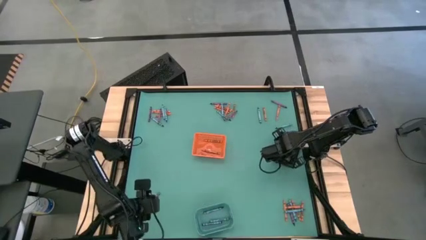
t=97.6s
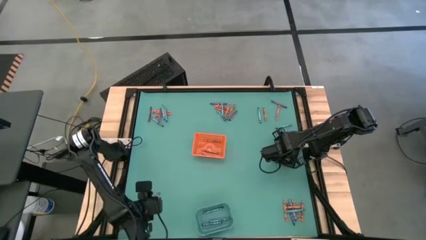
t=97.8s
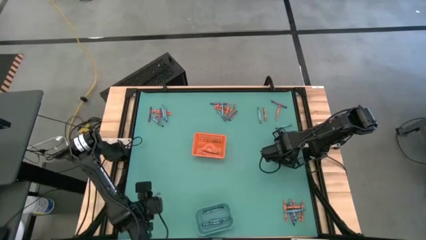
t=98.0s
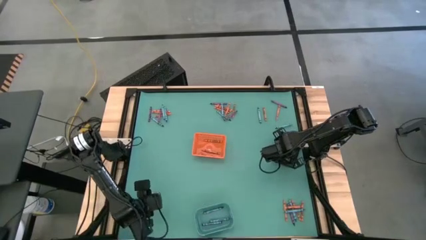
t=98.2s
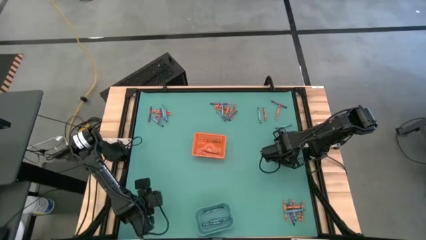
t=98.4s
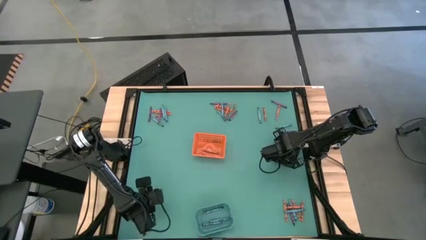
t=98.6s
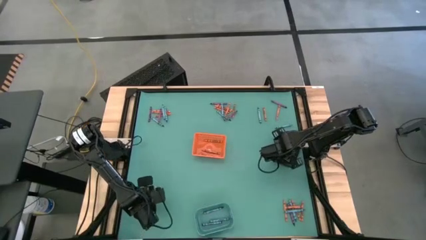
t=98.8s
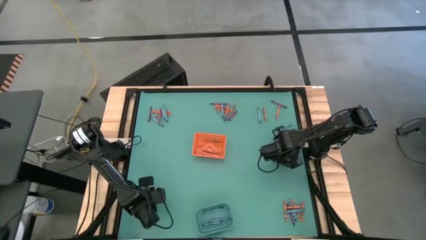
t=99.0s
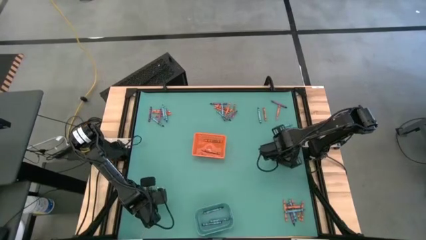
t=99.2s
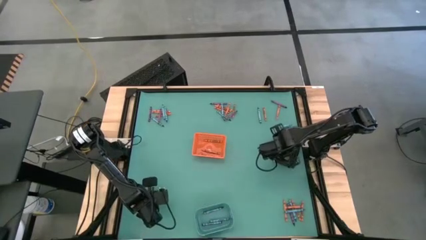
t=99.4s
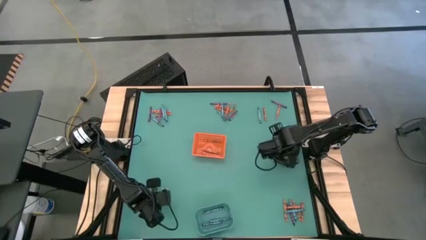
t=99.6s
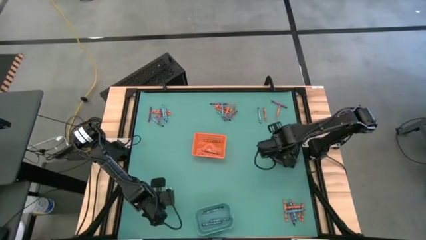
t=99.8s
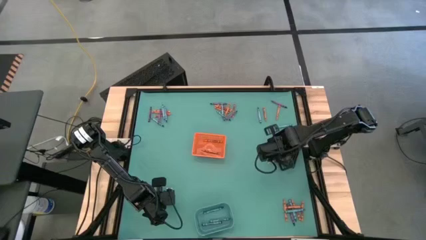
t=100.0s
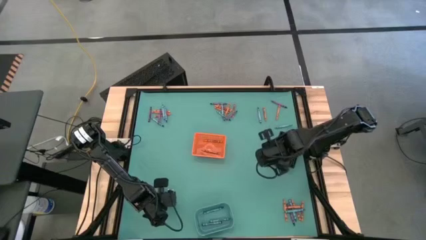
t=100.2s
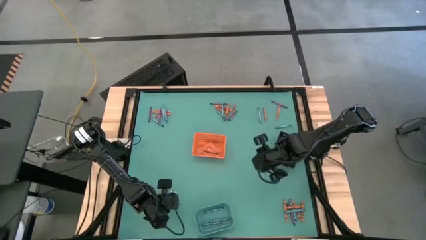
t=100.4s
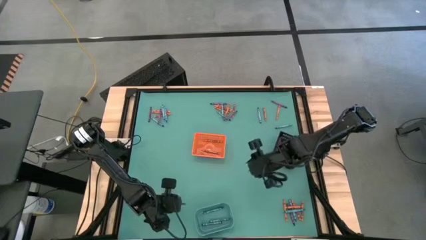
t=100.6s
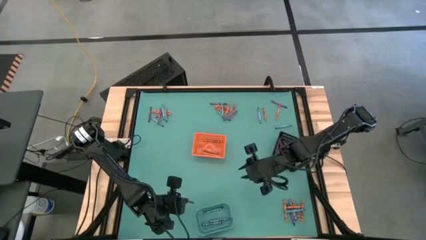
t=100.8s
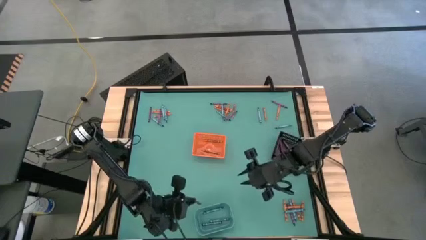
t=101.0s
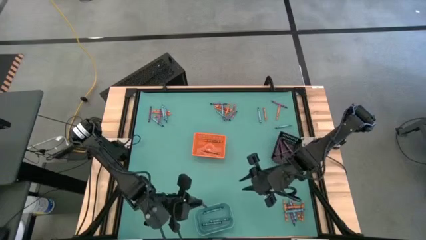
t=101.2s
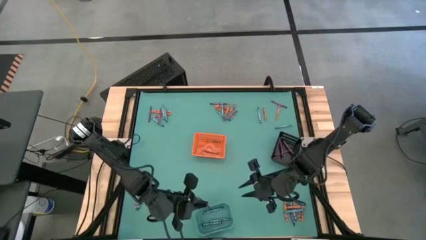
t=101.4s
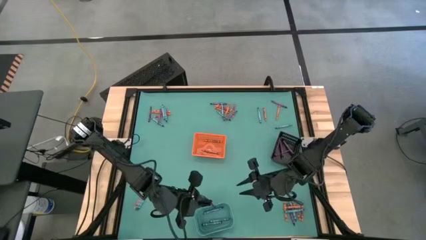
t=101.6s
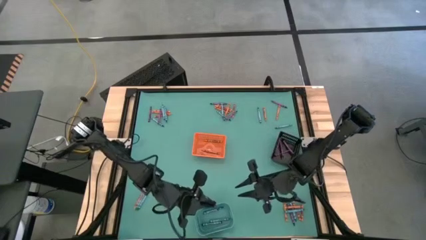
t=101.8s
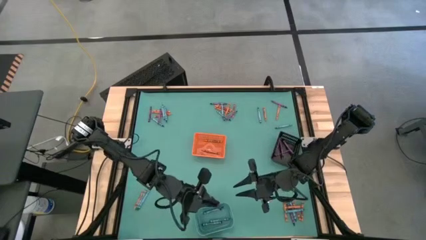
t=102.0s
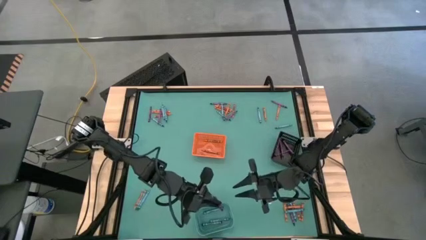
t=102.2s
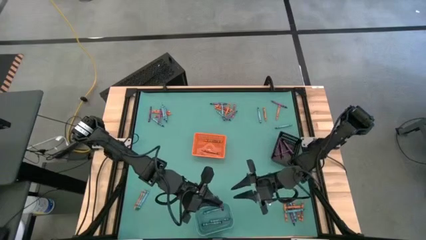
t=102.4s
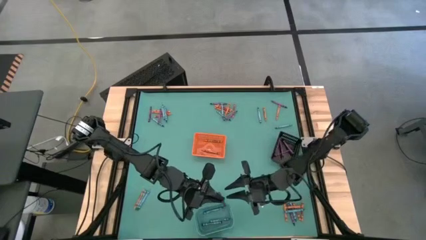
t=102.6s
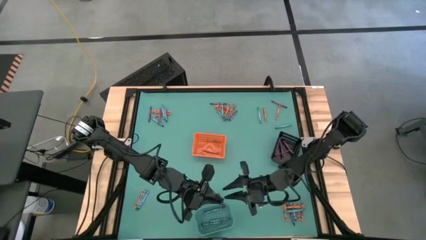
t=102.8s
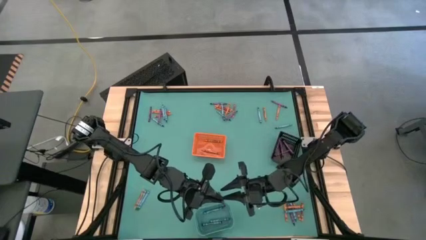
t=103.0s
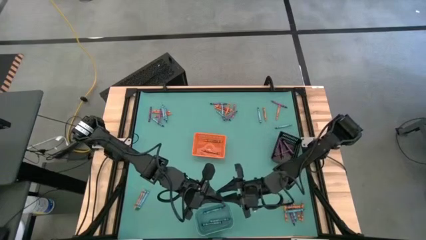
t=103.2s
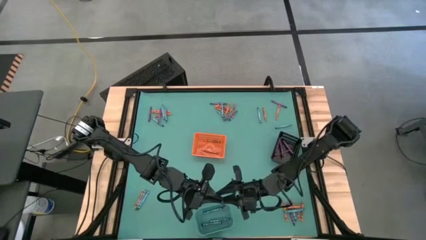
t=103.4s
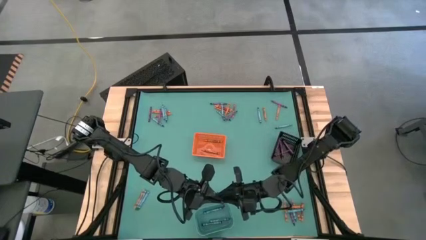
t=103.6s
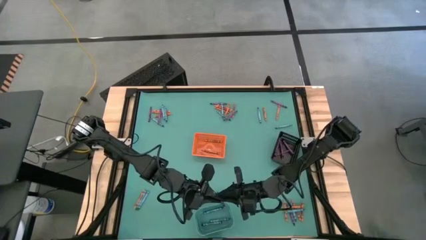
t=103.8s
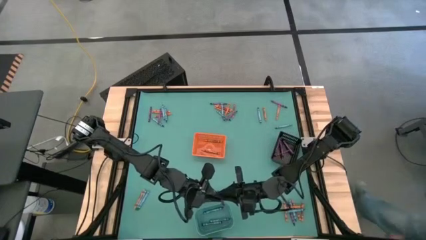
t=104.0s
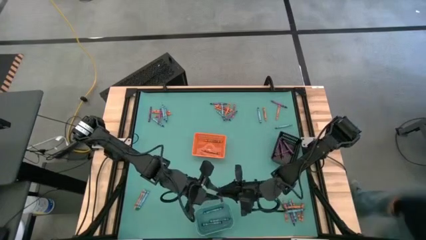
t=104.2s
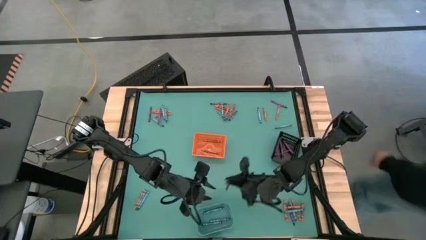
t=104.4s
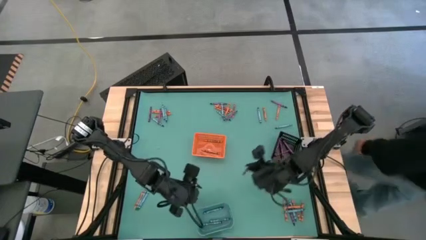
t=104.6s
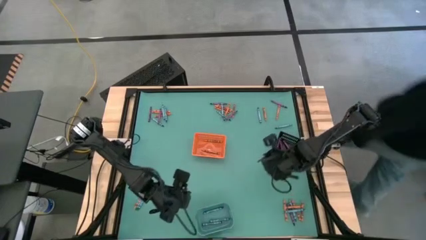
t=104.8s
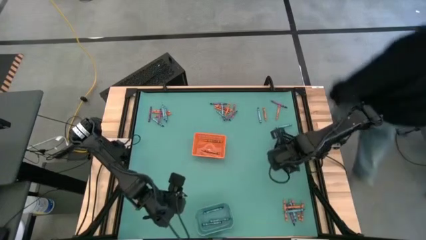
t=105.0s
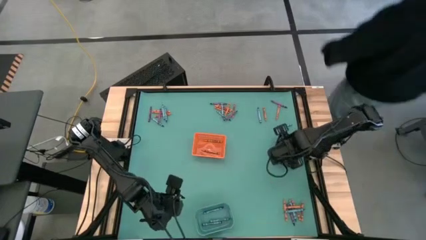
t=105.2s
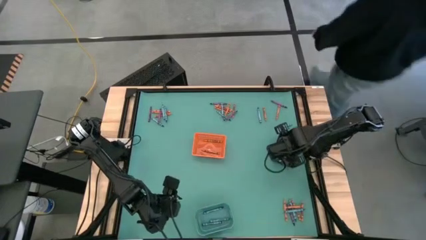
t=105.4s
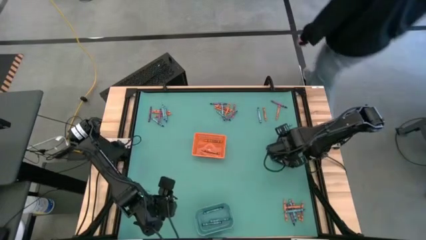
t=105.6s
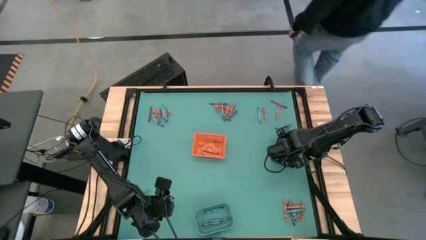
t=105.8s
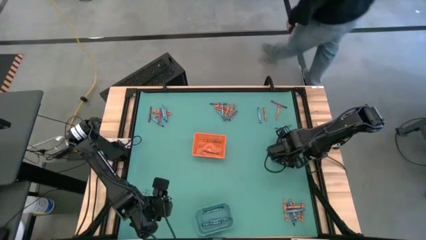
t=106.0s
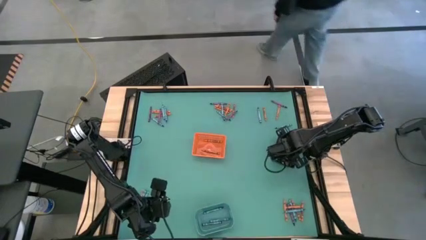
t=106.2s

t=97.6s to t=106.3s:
Task: Sort crayons
Put the purple crayon into the black bin

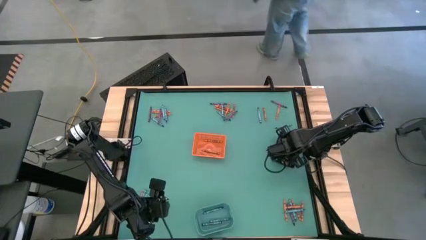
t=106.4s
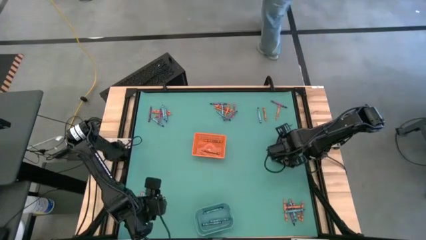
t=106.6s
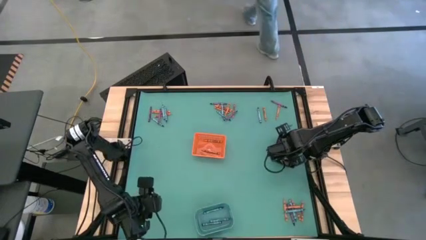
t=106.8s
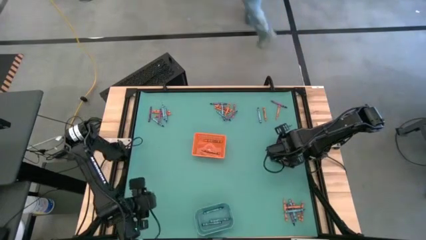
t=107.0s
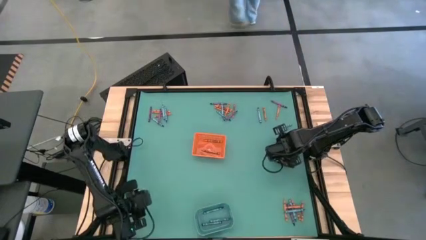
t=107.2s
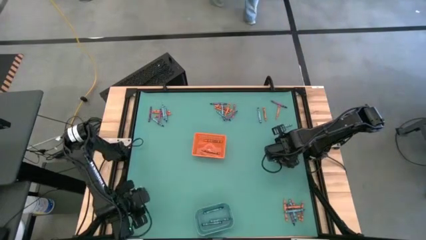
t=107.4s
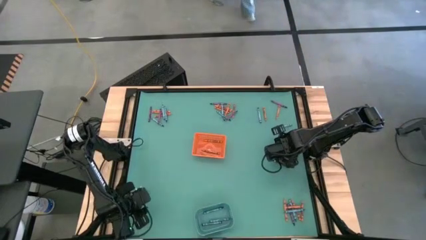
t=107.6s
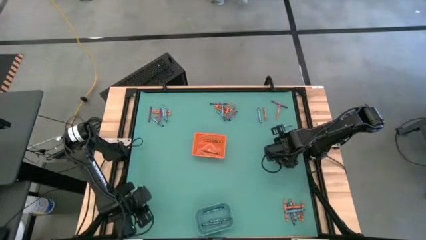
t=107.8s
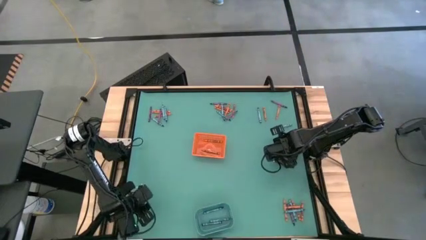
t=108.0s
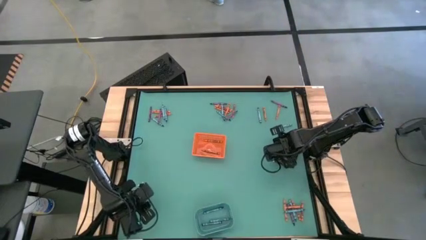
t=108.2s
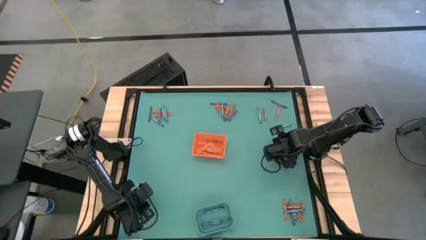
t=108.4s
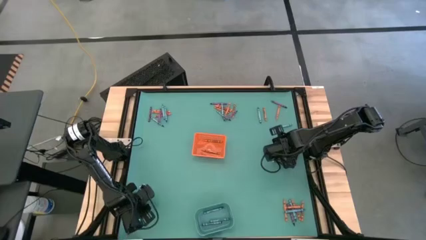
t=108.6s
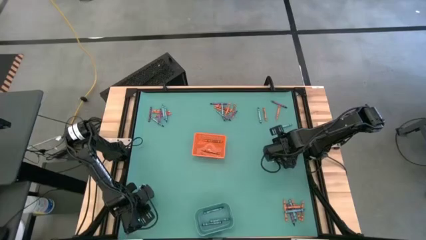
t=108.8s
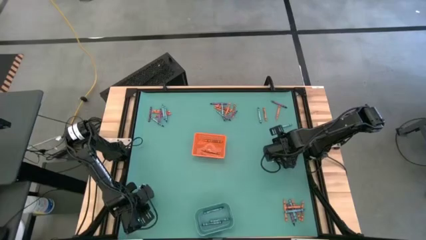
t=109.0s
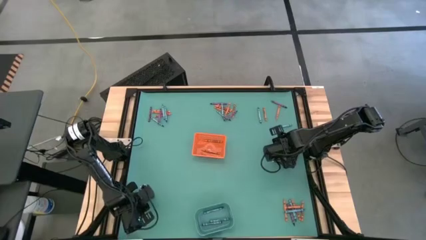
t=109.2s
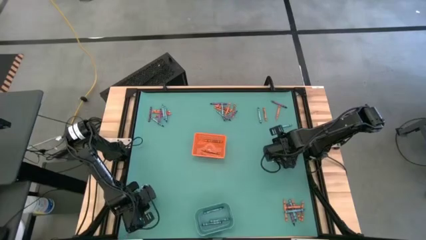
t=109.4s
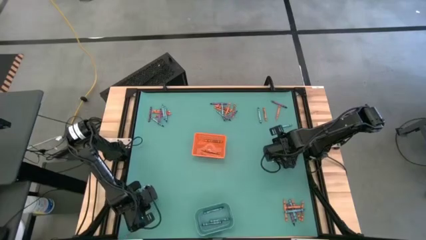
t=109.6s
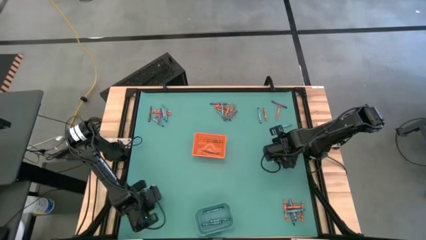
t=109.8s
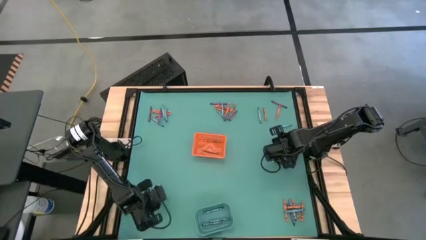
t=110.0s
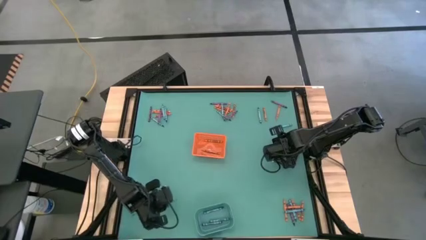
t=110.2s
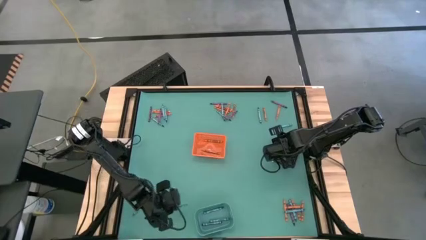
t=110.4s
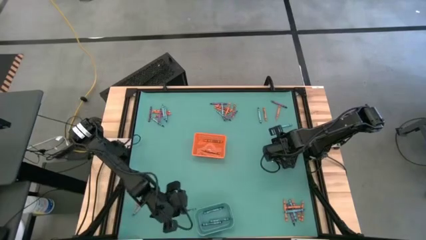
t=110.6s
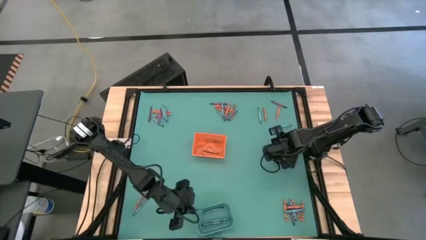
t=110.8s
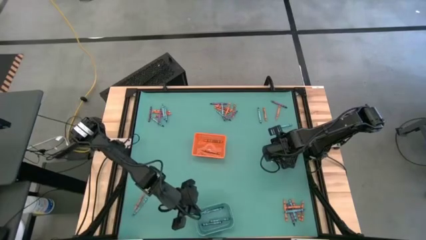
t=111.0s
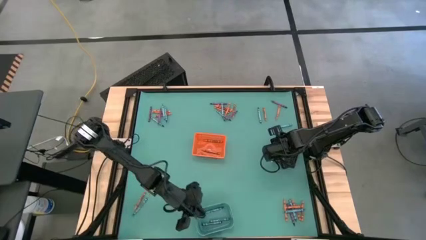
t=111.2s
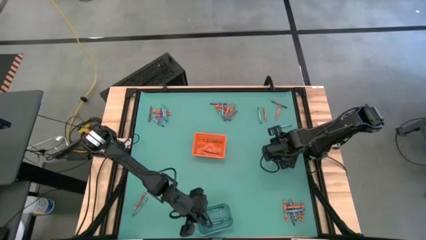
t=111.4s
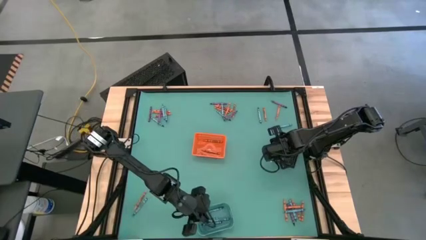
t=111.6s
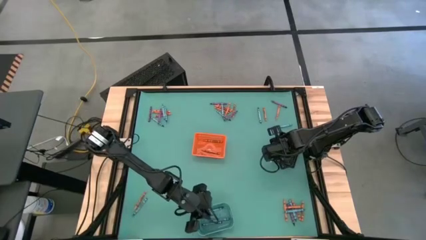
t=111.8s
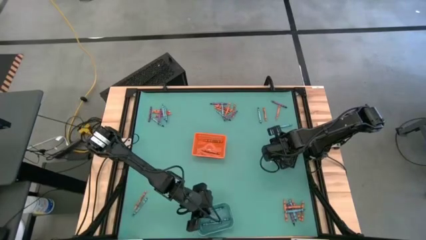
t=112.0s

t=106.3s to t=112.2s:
Put the blue crayon into the blue bin
